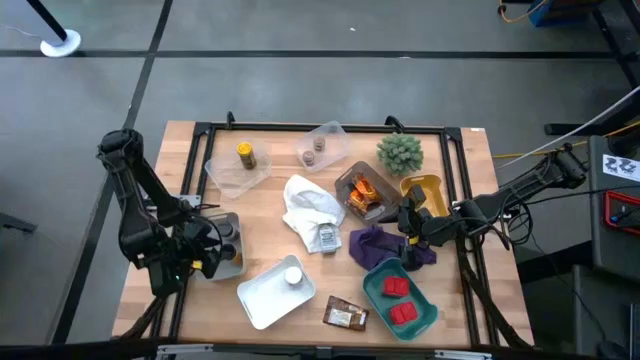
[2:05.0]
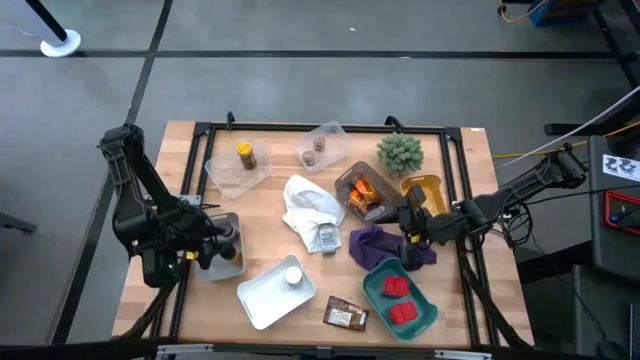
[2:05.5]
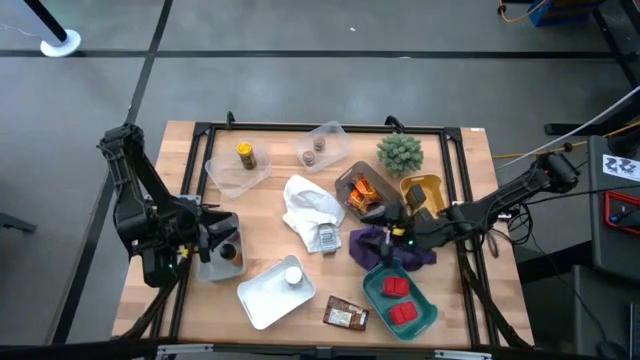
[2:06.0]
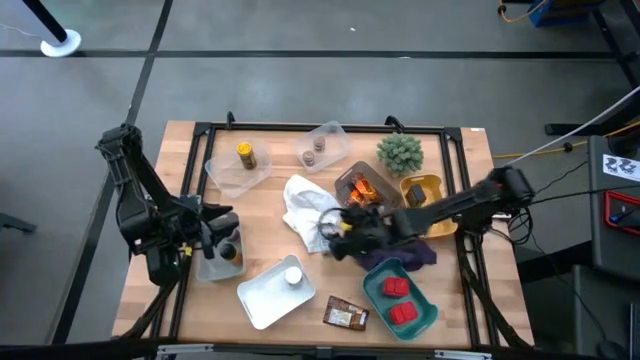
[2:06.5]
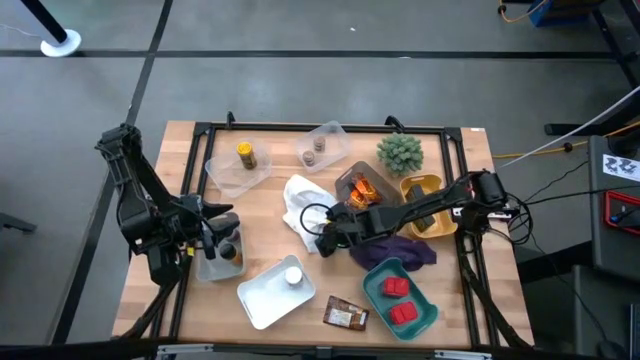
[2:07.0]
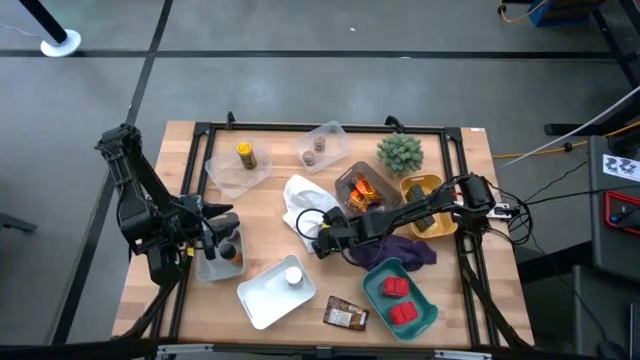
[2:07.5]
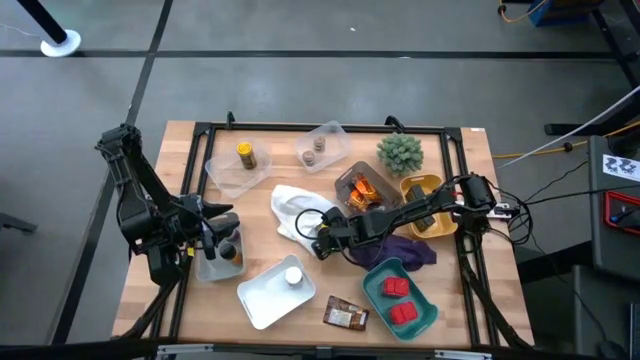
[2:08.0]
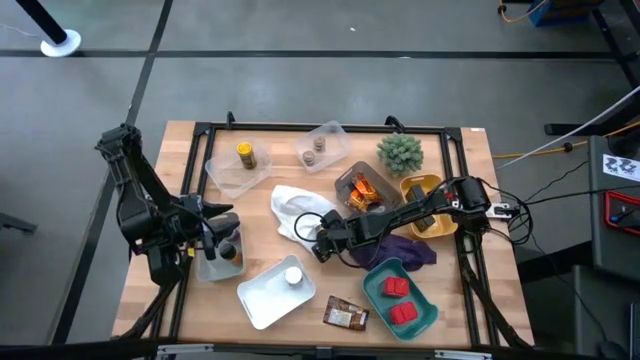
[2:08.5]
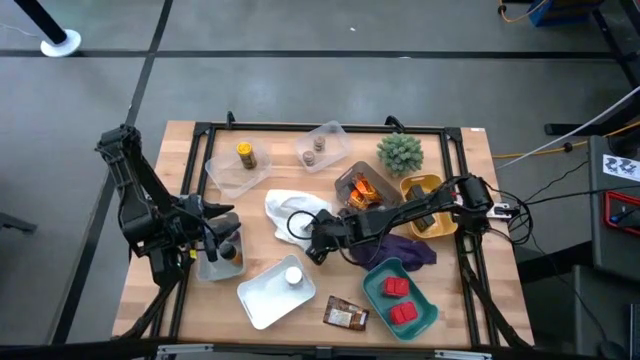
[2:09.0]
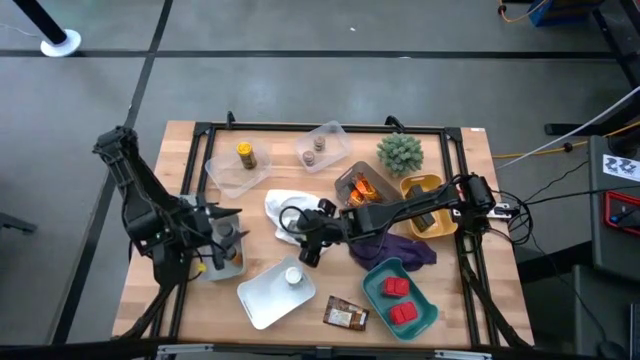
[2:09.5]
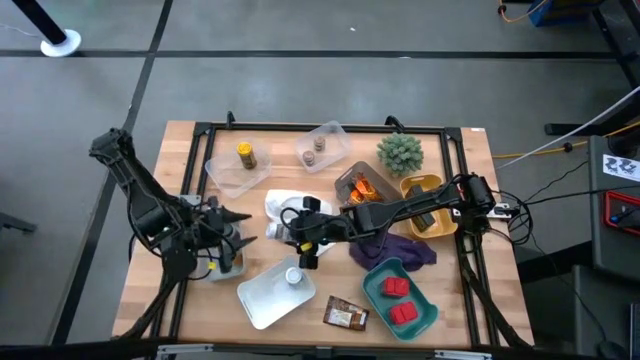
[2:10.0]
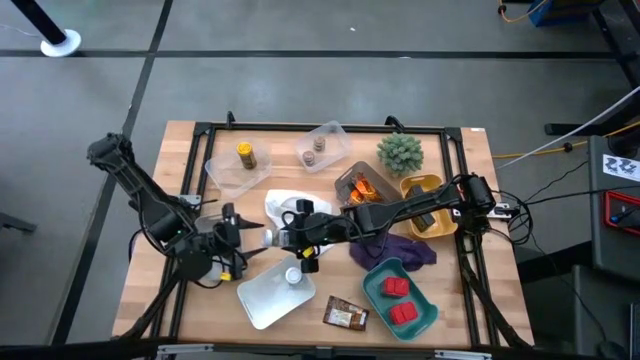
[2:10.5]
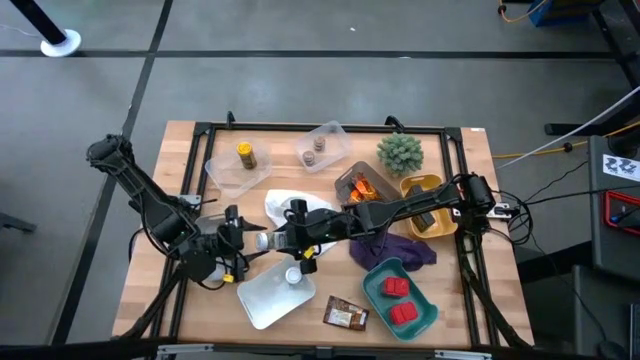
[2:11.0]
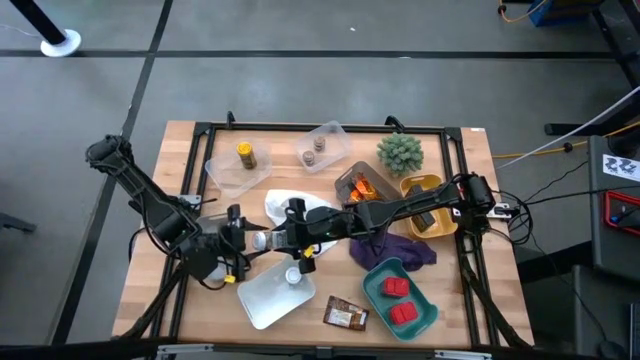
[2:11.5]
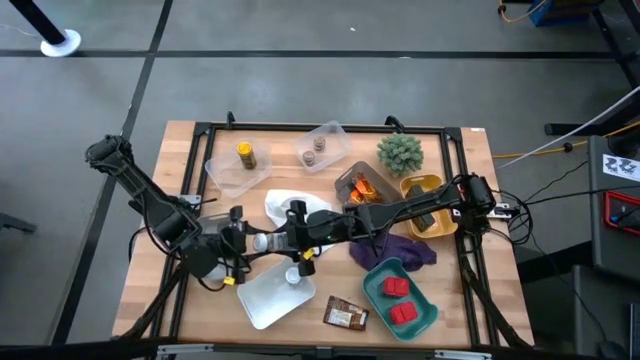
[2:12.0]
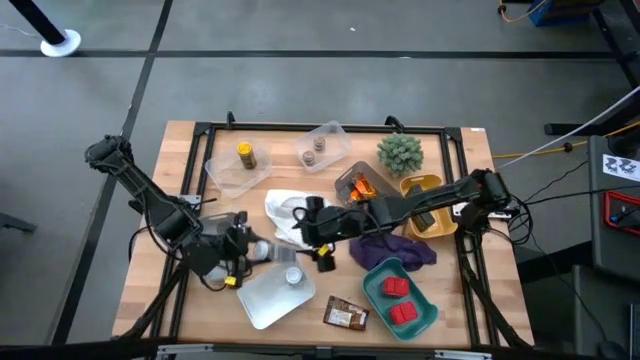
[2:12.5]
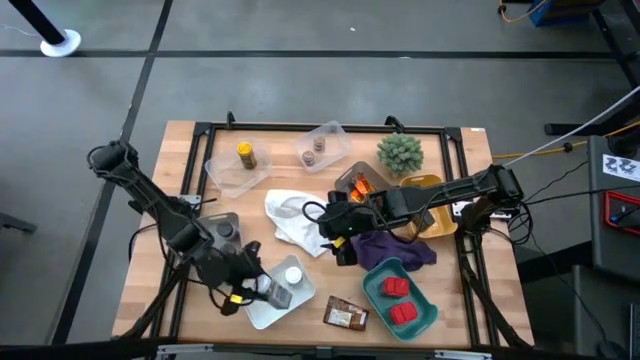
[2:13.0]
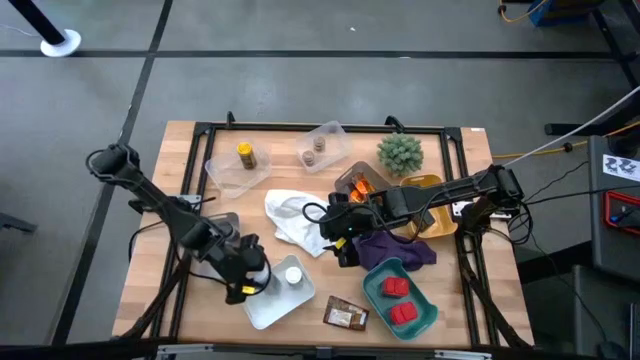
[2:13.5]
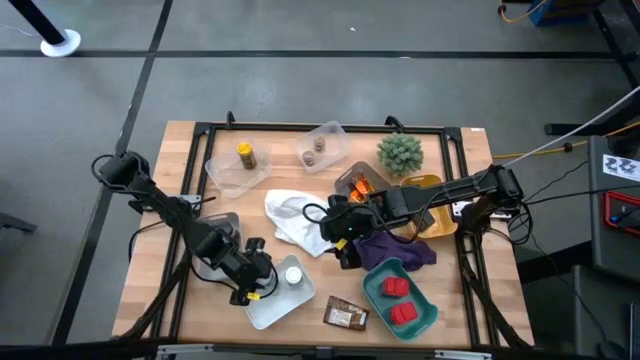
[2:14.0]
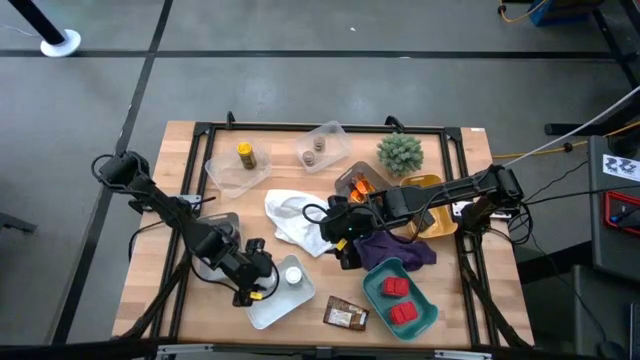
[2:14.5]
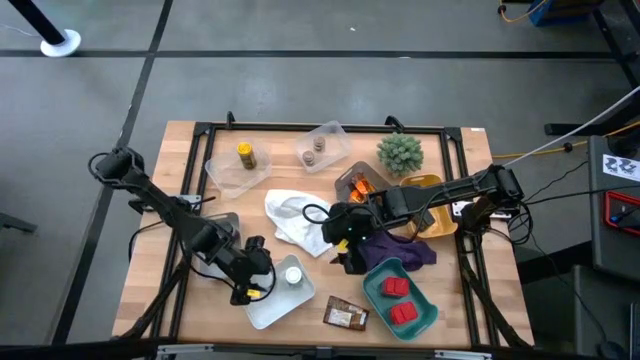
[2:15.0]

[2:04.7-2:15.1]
Task: Sort spices by type
Put the white spice bottle into the white bin

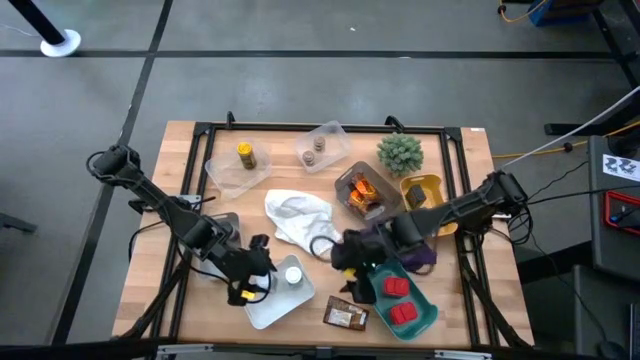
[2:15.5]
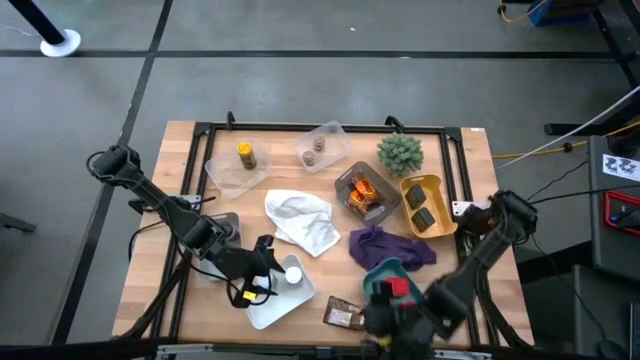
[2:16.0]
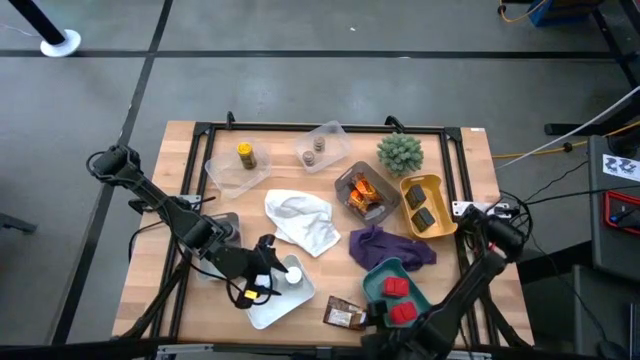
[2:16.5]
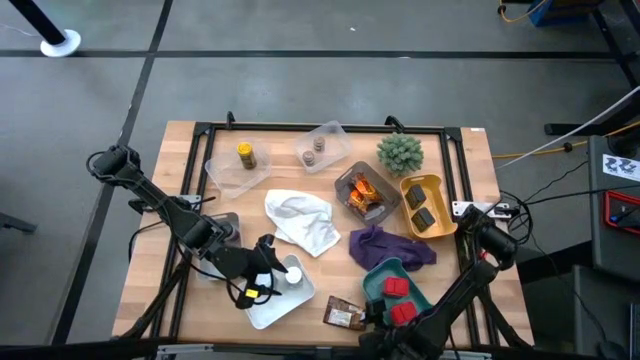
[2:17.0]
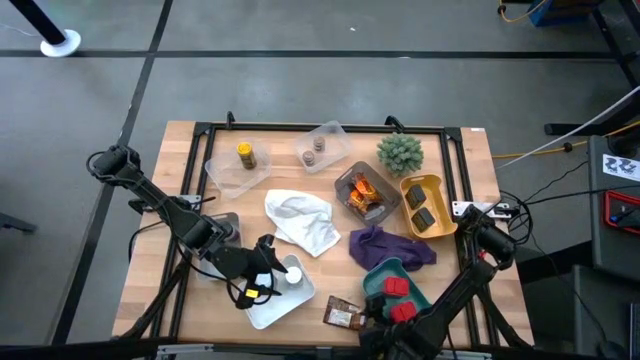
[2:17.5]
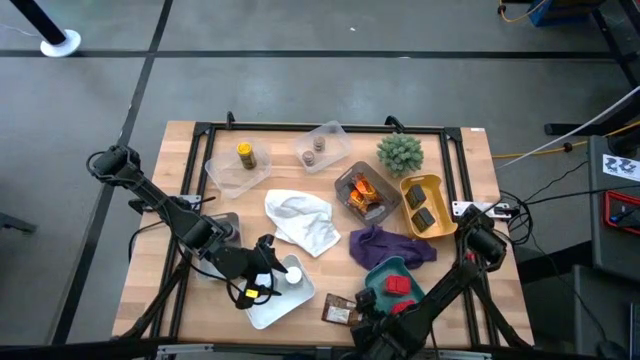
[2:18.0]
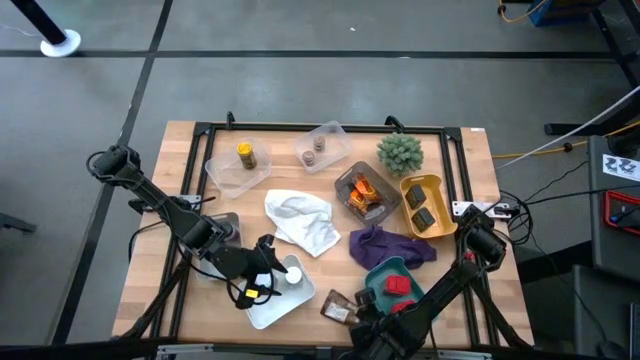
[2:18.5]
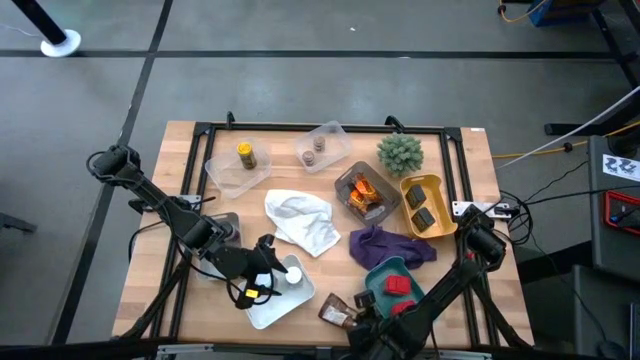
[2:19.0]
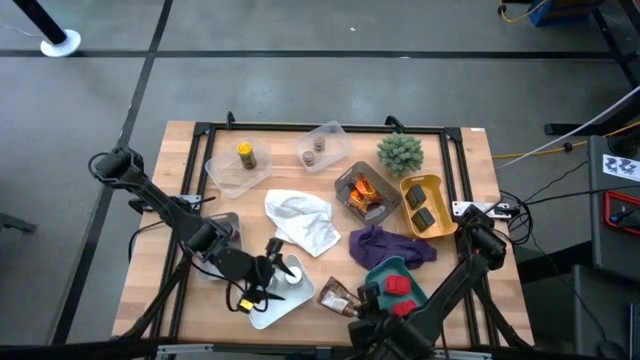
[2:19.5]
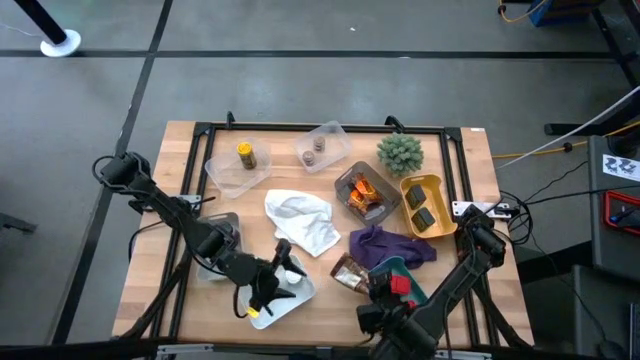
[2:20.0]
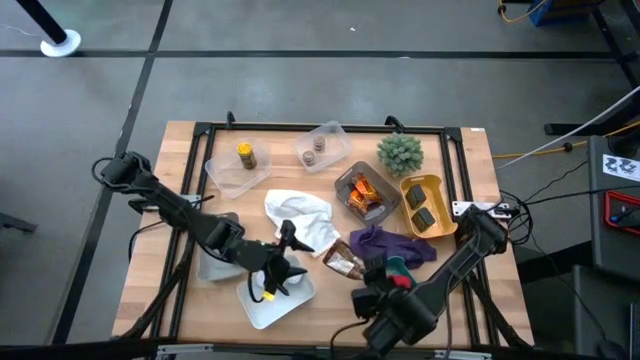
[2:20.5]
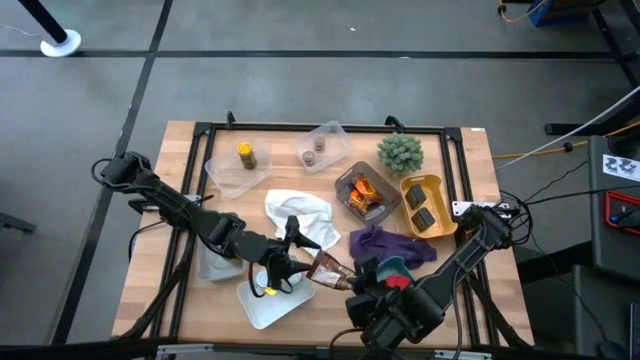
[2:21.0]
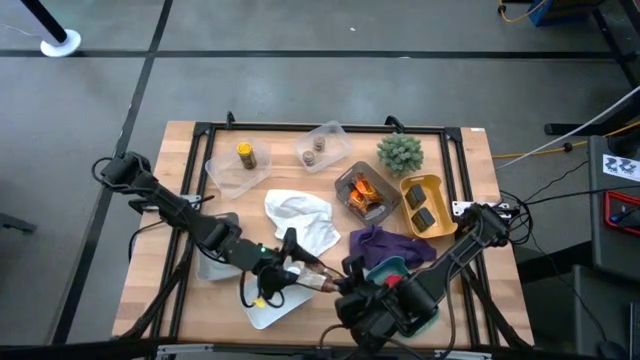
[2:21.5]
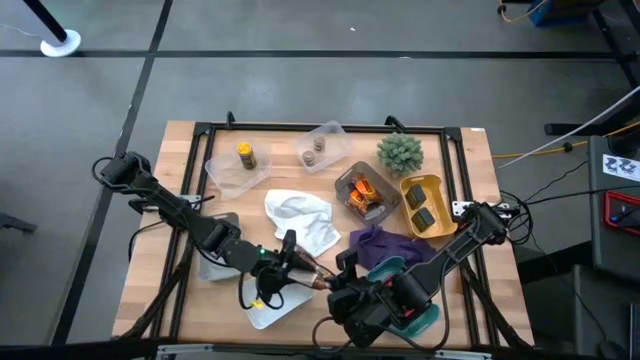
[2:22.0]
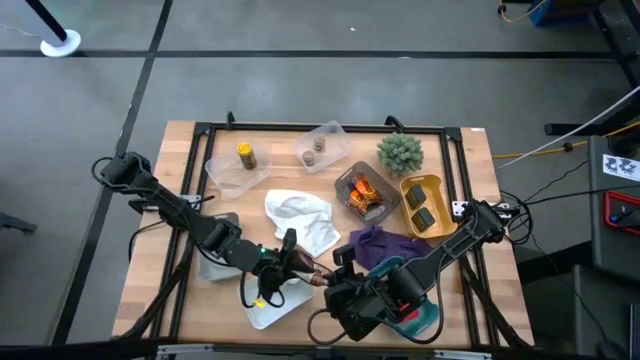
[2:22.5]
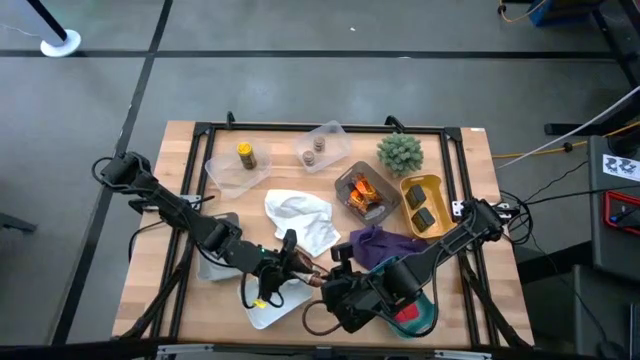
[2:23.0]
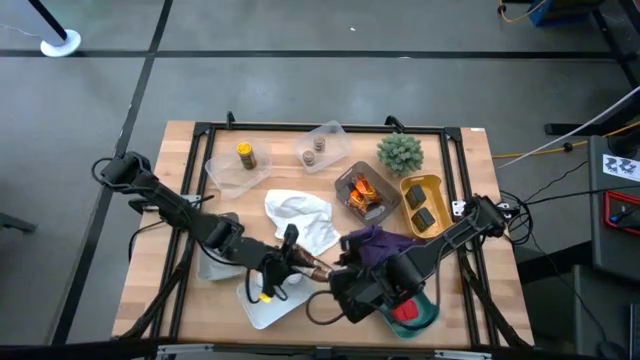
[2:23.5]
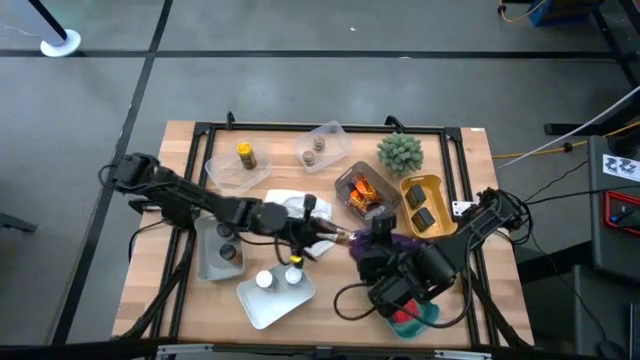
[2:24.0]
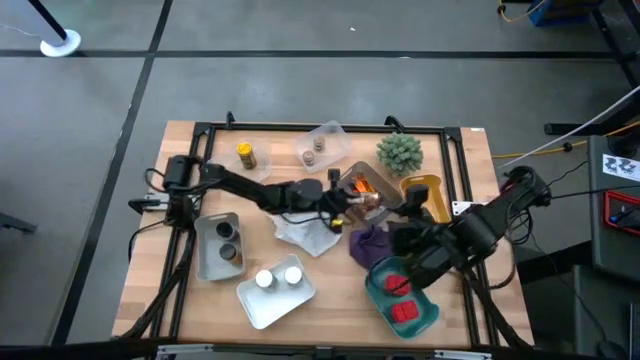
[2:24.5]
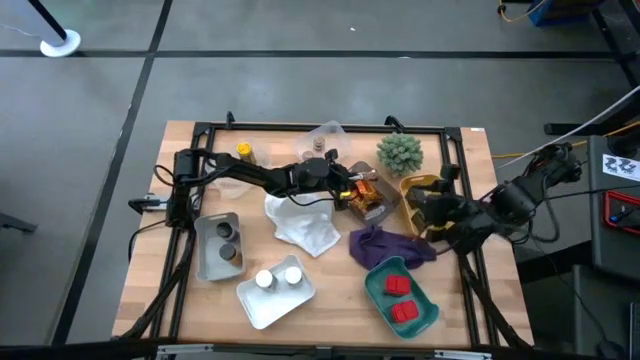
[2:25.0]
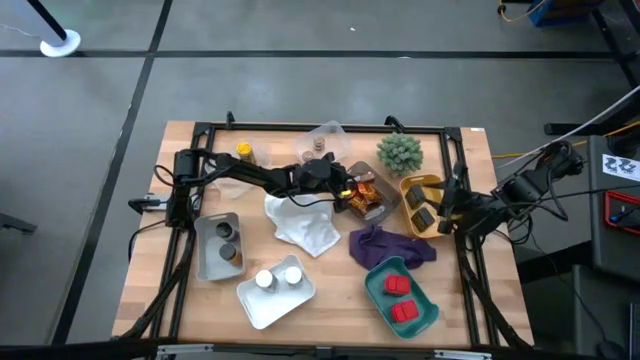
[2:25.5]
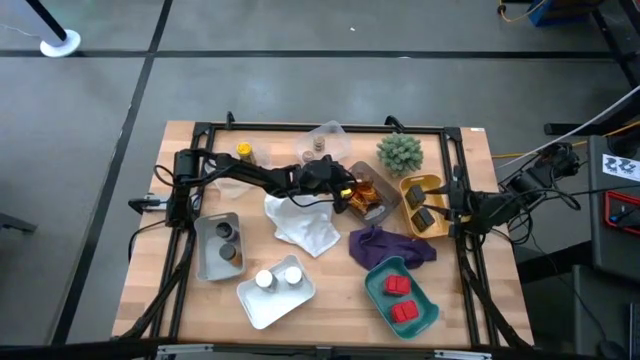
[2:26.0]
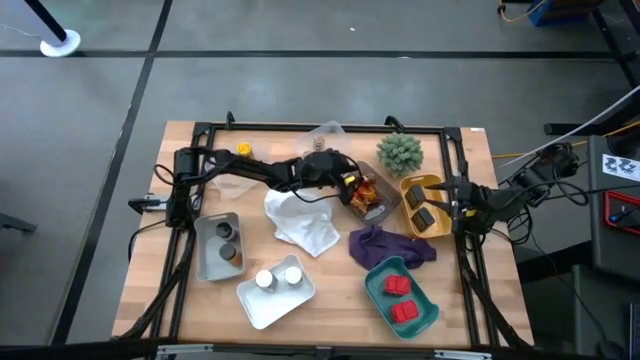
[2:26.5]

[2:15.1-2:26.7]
Put the orange spice pack into the black bin
